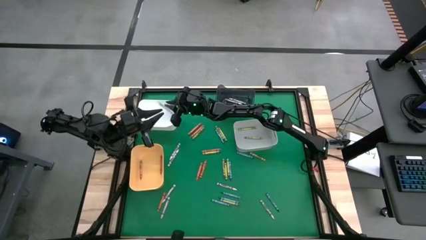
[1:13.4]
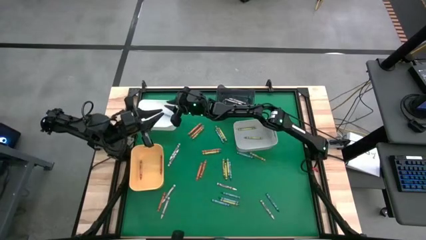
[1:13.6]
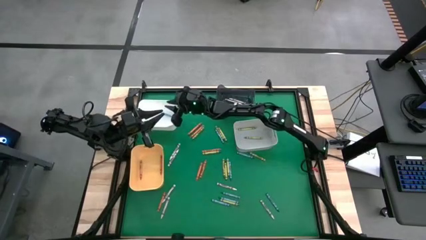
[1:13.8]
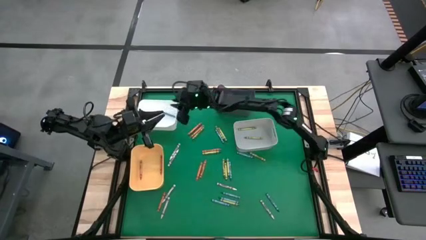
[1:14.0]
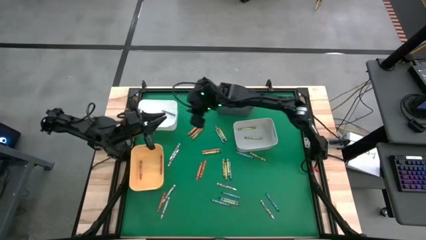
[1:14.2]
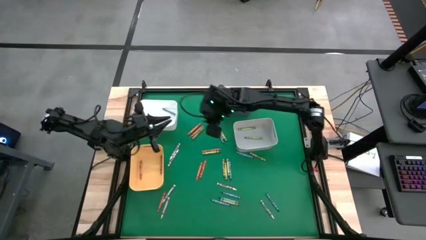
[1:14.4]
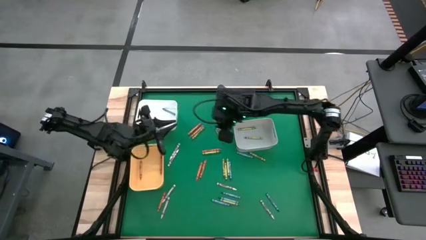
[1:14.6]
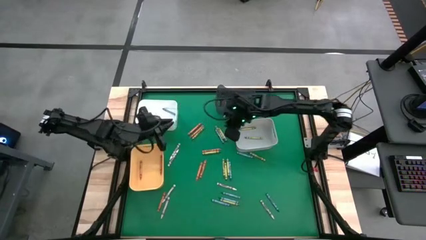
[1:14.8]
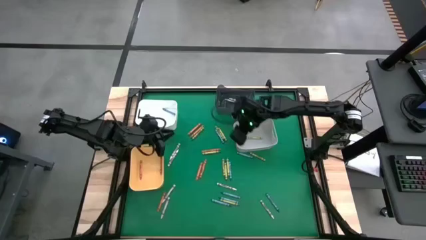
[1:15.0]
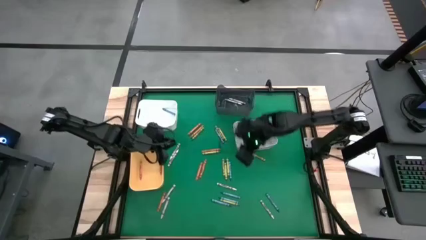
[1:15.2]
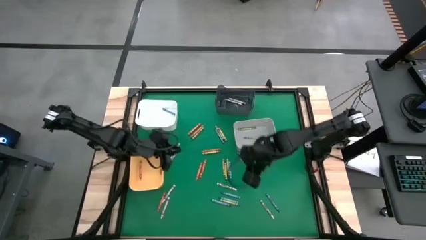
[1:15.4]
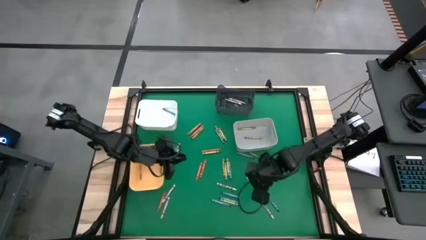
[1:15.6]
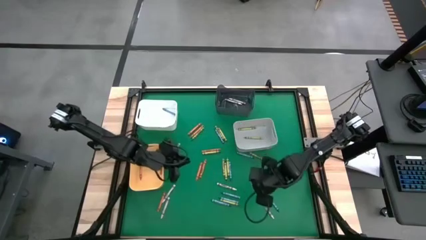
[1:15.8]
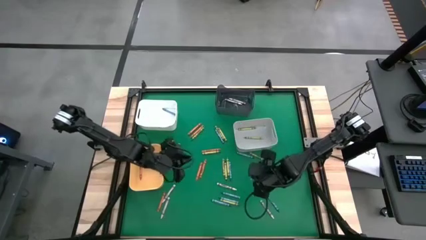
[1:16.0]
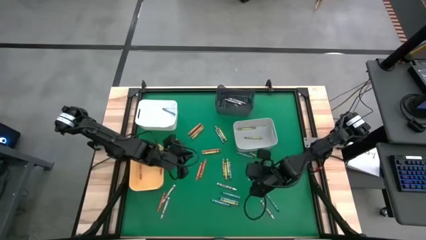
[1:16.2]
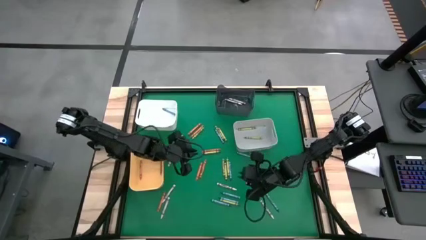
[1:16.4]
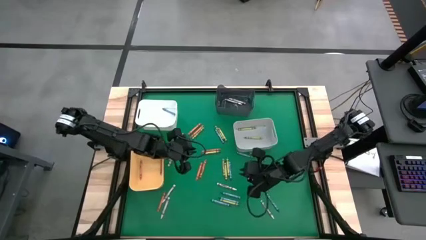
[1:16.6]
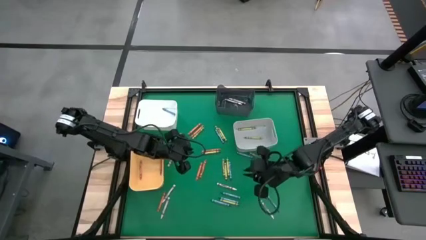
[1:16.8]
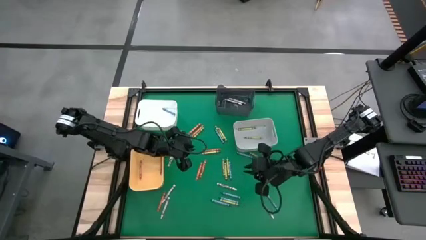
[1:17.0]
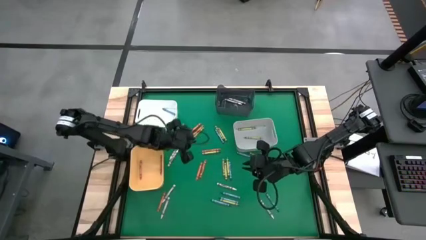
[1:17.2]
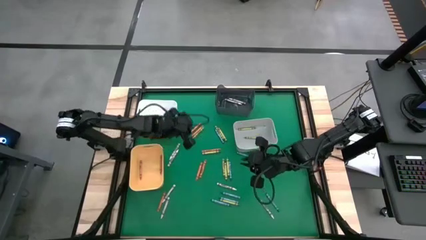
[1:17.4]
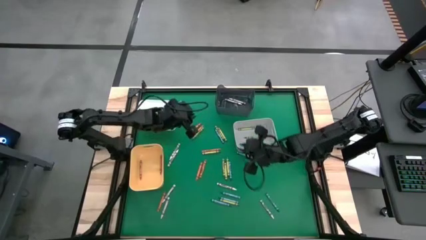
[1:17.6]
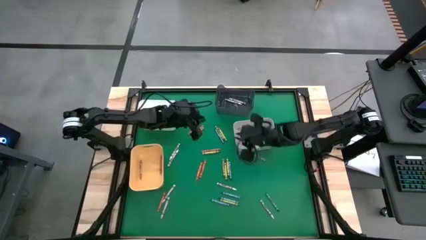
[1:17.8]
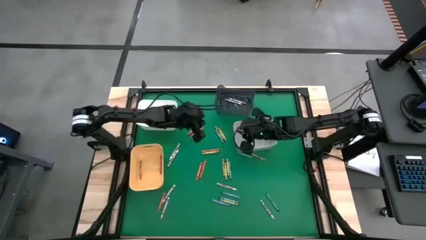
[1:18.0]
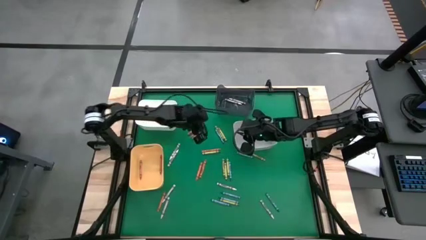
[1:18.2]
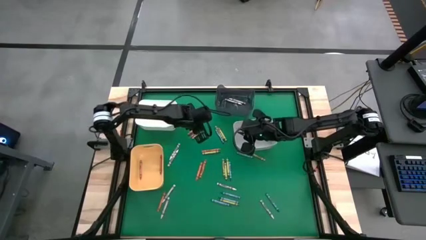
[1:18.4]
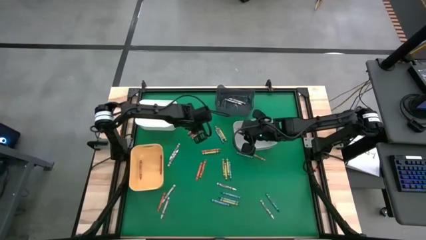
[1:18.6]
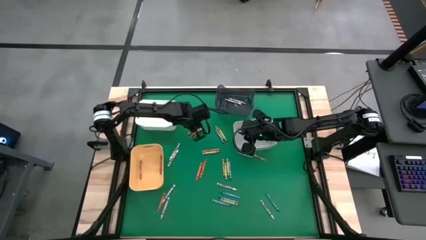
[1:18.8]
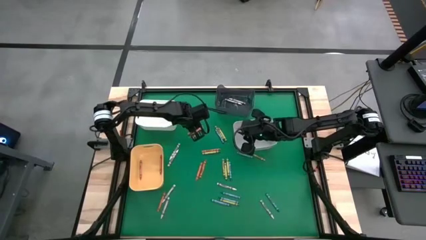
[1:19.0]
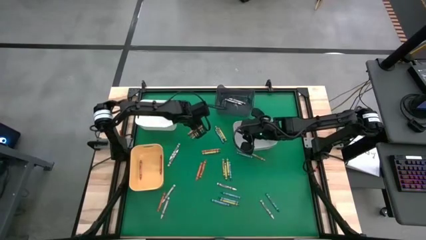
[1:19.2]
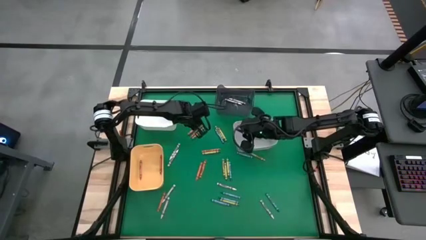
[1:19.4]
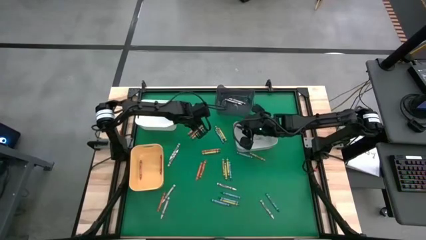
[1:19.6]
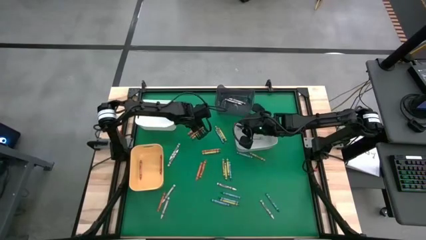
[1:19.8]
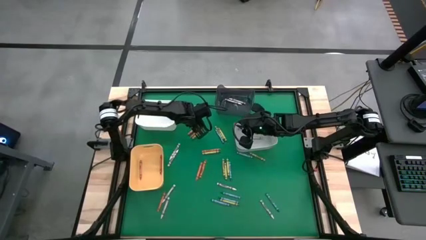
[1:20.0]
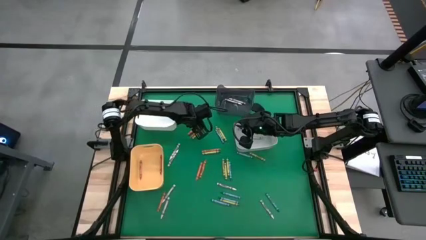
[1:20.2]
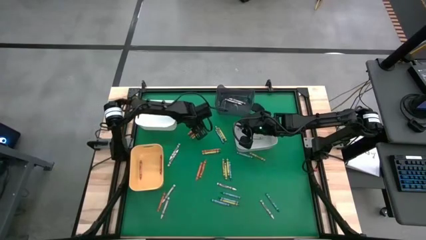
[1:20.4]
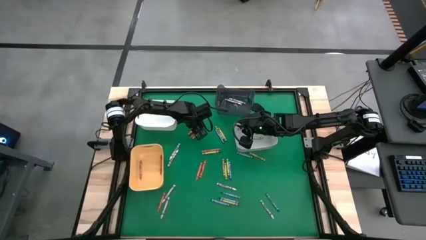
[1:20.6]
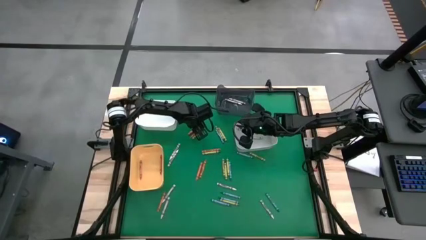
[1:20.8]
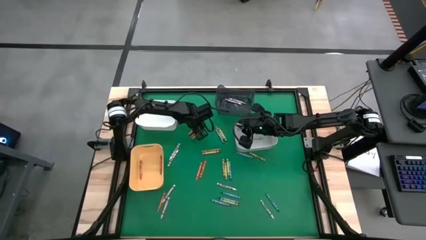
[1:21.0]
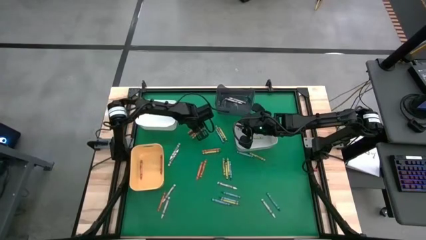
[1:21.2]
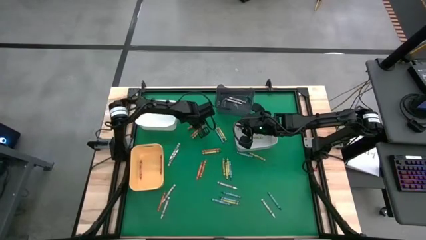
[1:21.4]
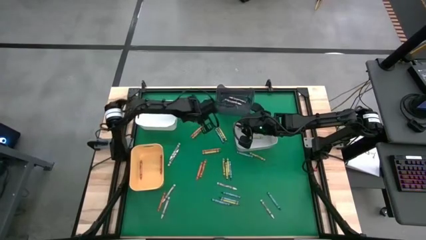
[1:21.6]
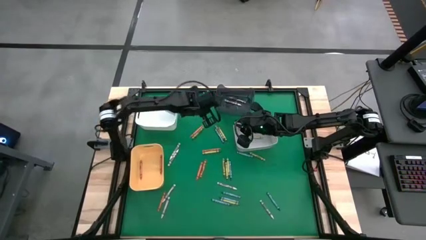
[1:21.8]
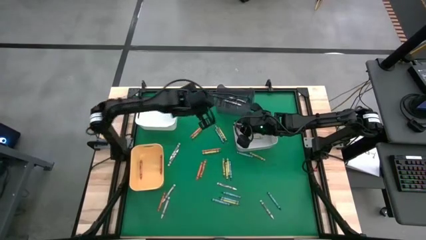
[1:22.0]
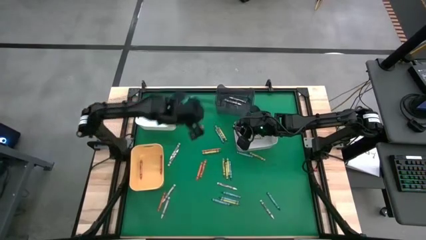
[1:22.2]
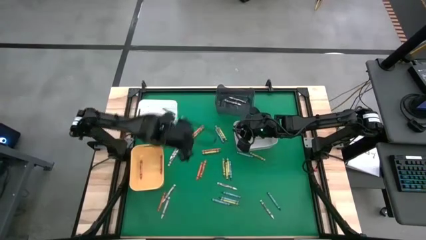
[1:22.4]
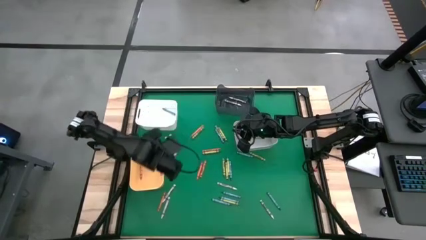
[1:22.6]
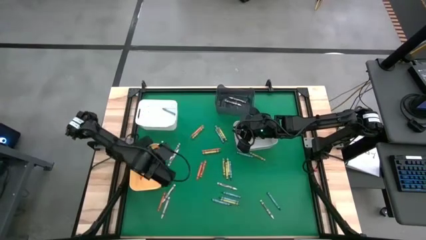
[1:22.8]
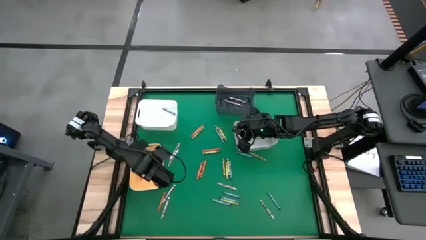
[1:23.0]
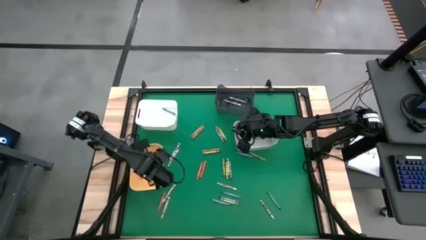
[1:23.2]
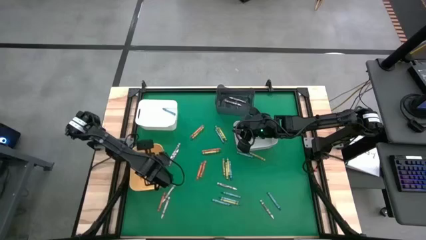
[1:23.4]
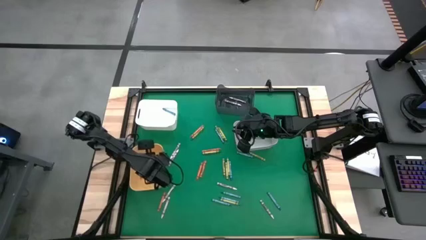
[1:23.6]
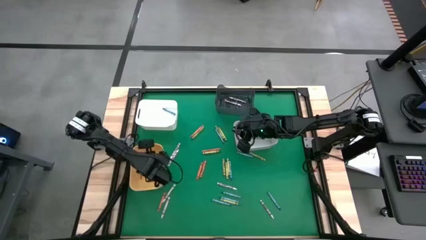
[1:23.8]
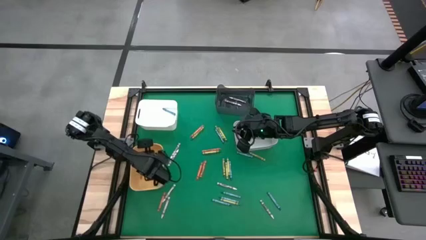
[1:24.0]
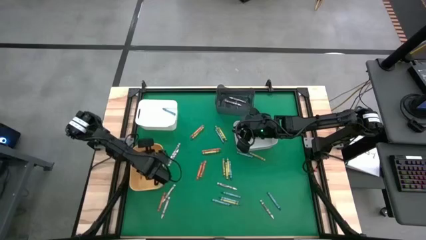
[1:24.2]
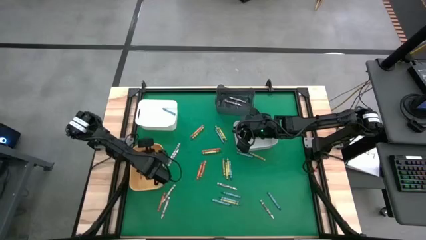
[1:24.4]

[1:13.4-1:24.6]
Task: Sort crayons
Put the orange crayon into the orange bin

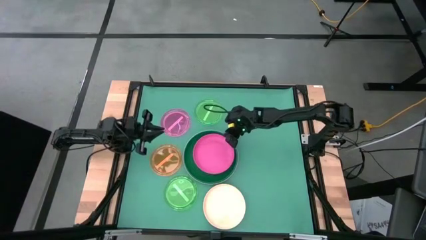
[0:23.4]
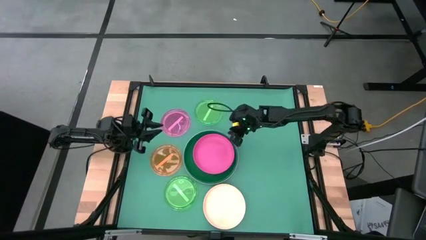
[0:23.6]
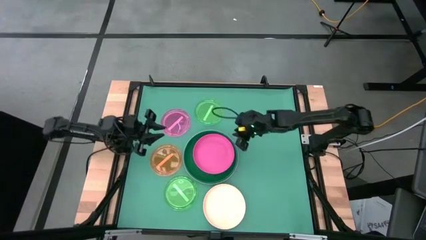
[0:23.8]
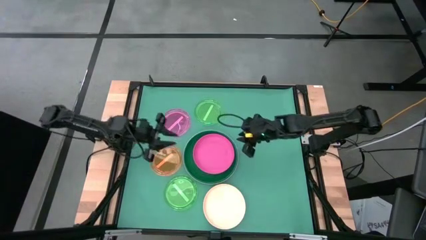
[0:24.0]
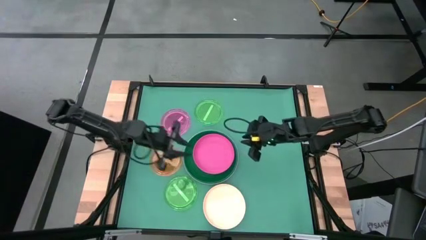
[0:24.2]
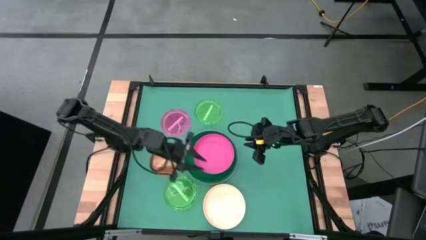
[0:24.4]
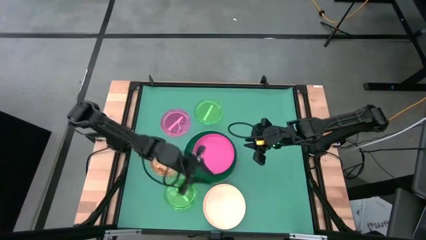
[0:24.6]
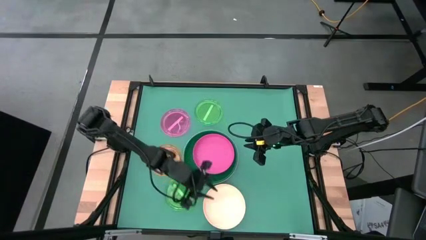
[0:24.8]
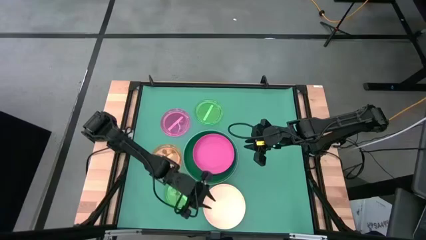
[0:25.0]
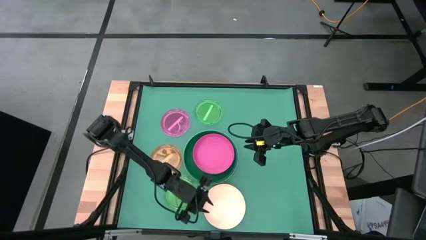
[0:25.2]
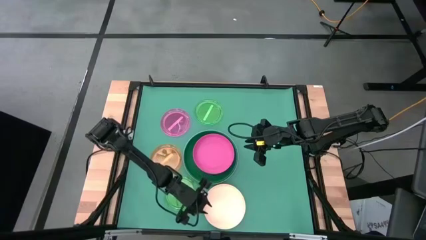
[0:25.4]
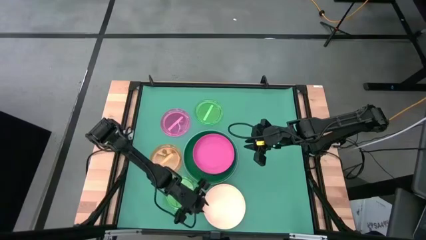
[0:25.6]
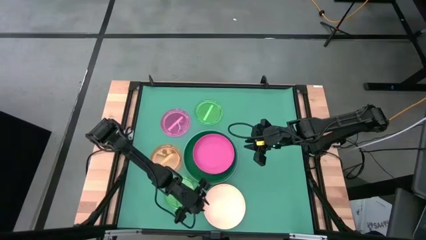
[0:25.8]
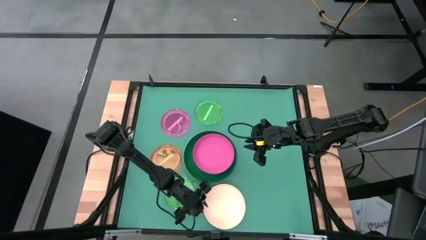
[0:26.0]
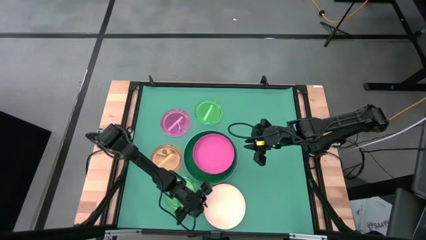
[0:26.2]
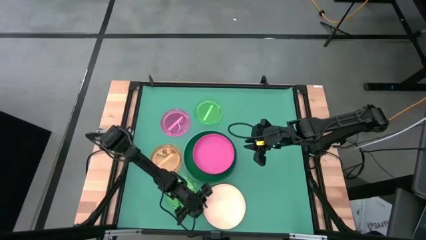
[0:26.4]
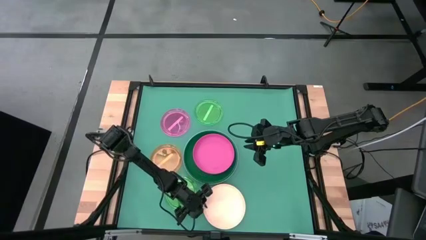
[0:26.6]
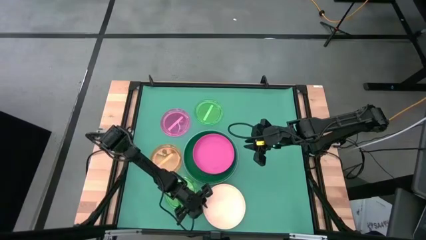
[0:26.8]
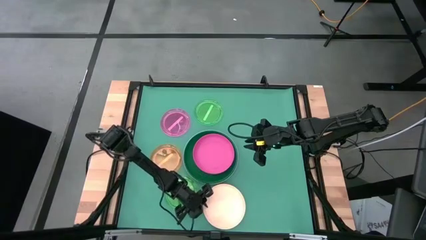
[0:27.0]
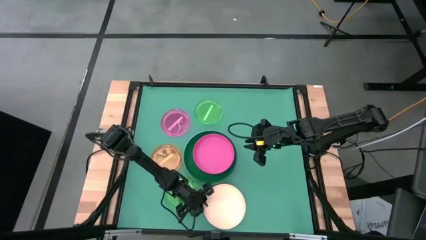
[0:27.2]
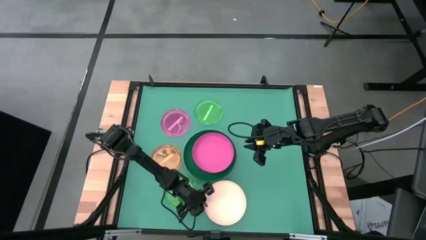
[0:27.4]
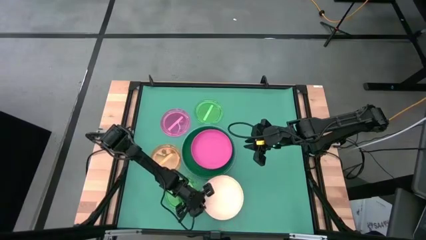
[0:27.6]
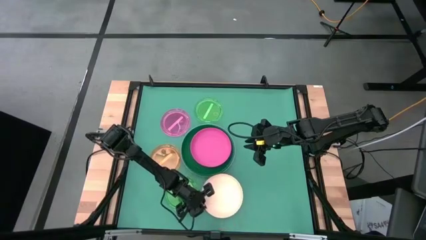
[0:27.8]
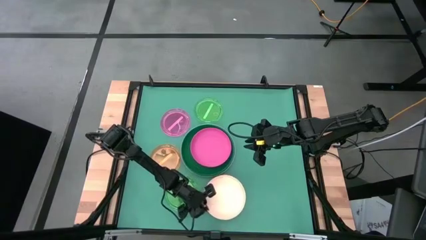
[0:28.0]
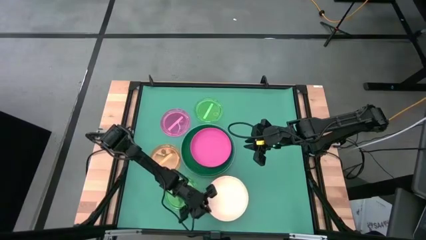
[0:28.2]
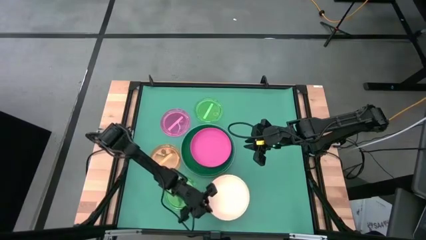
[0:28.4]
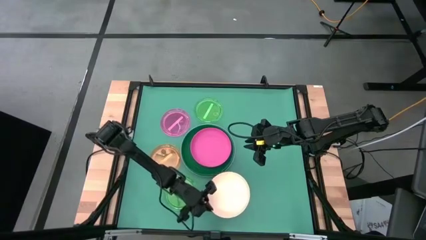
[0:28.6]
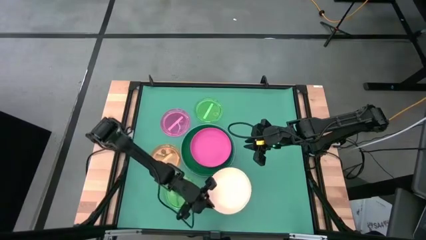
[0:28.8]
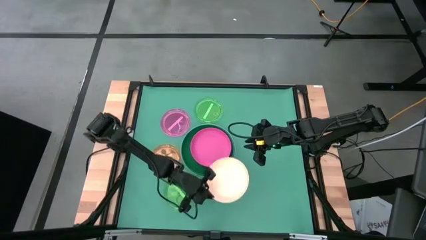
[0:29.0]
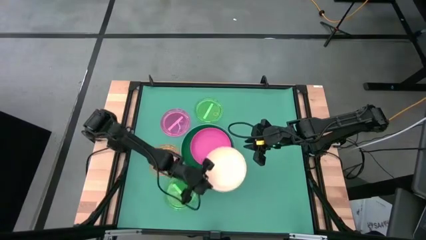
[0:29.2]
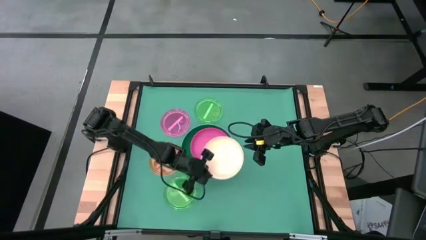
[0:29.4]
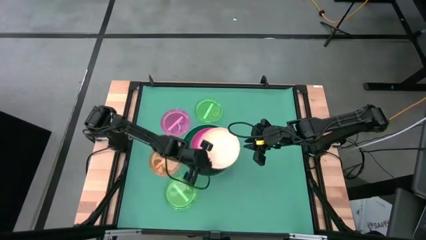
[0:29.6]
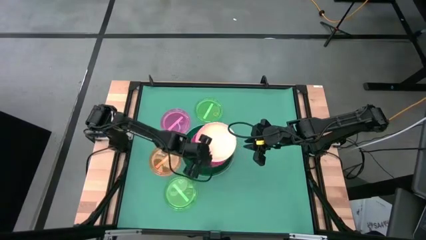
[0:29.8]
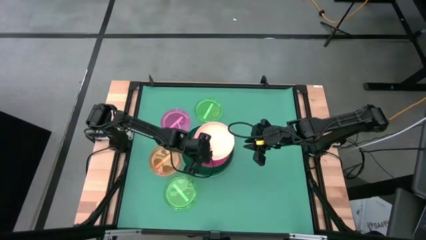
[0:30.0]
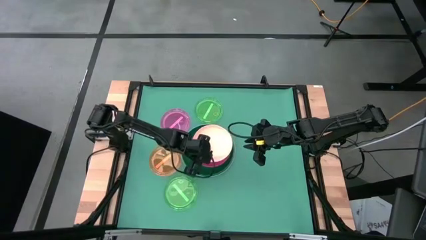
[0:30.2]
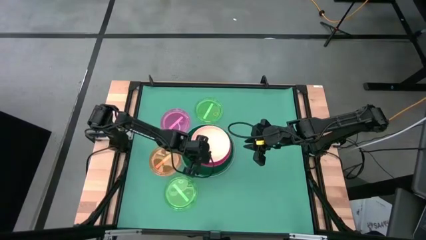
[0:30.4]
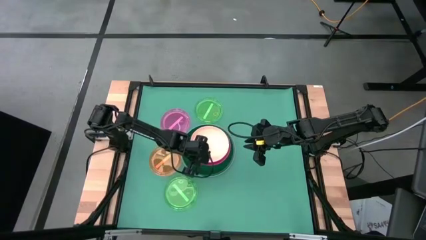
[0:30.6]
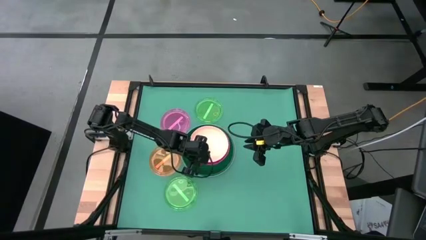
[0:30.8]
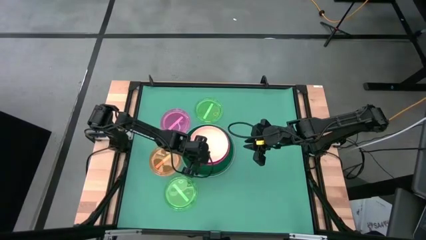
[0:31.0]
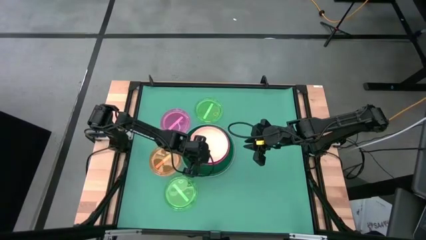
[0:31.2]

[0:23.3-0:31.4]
Task: Stack plastic plates
Stack the peach plate on top of the pink plate
